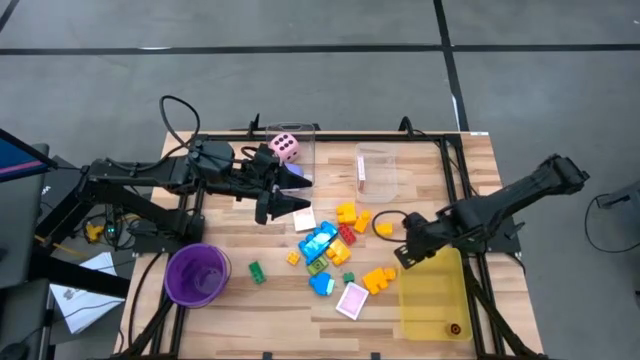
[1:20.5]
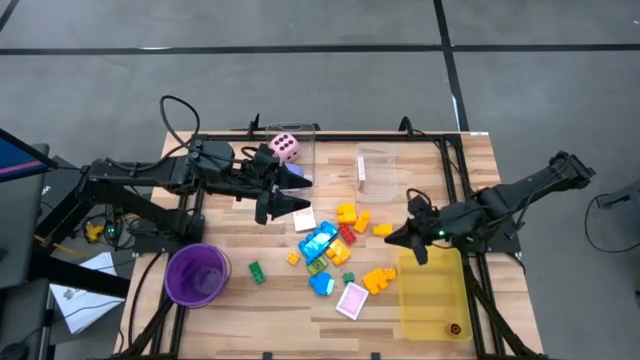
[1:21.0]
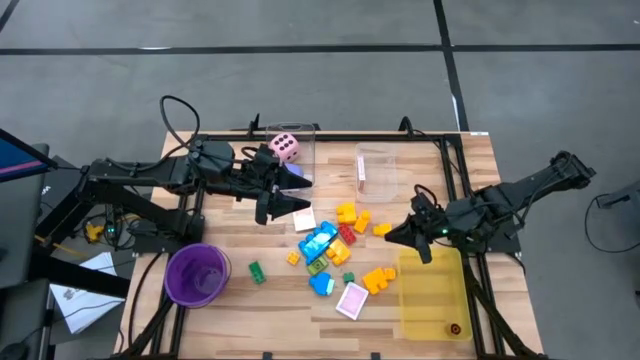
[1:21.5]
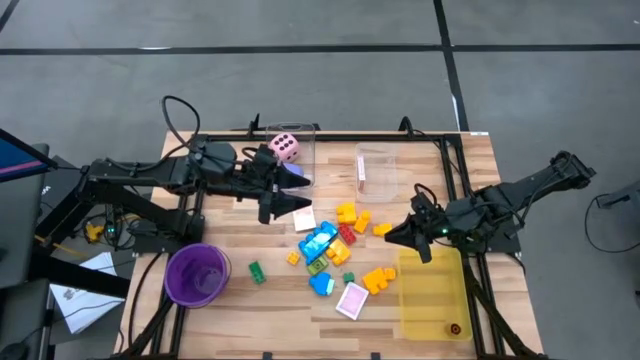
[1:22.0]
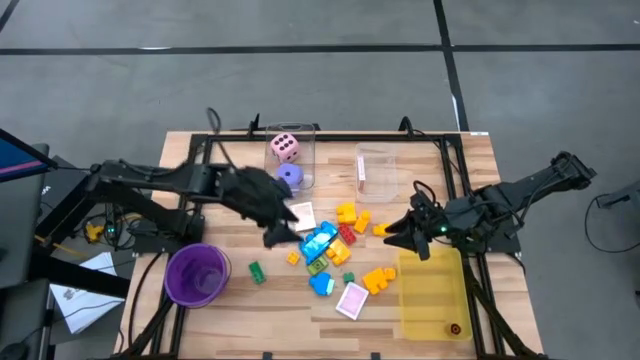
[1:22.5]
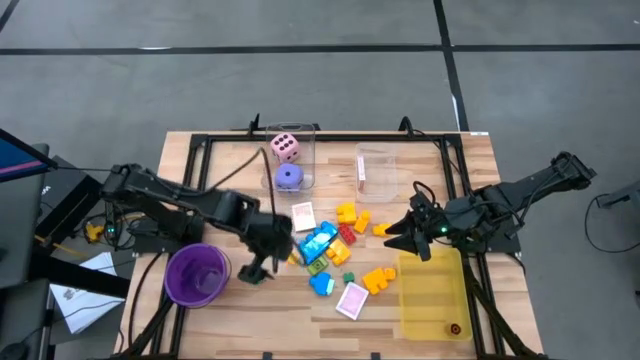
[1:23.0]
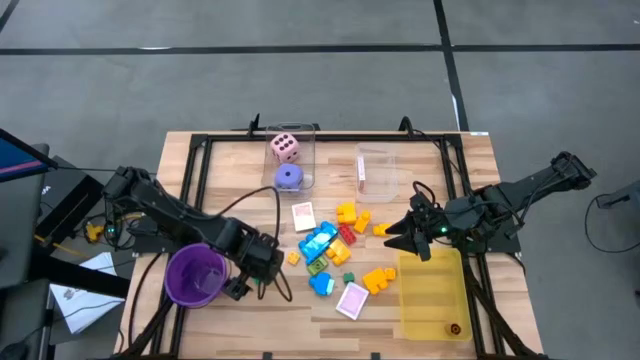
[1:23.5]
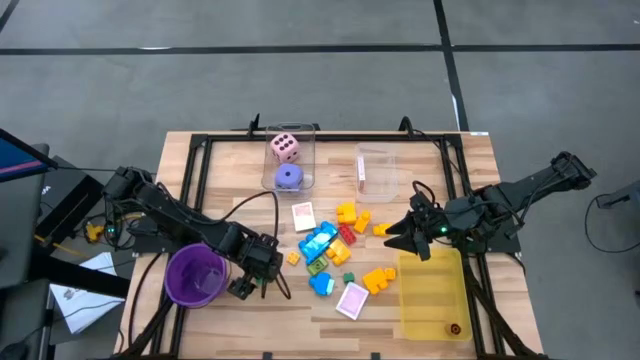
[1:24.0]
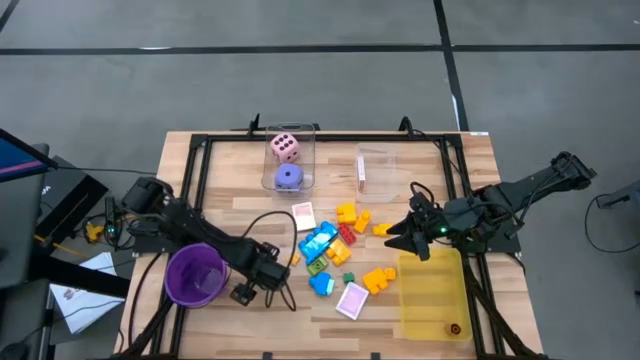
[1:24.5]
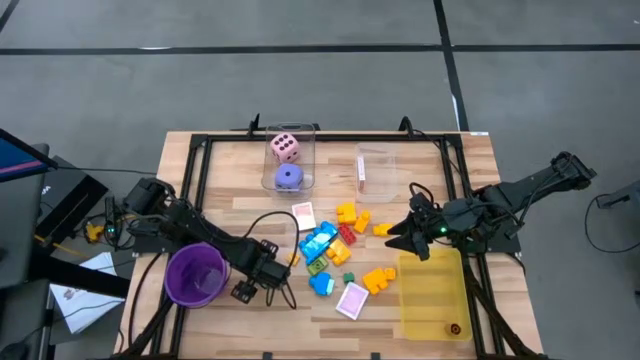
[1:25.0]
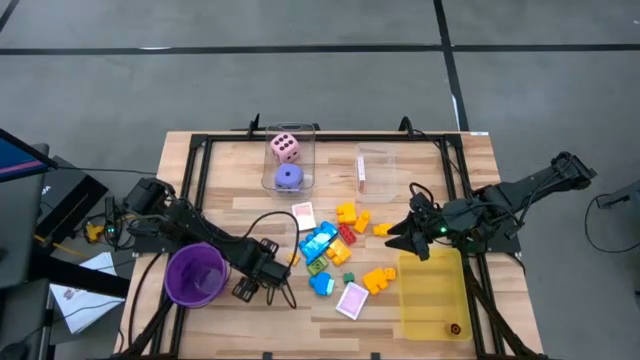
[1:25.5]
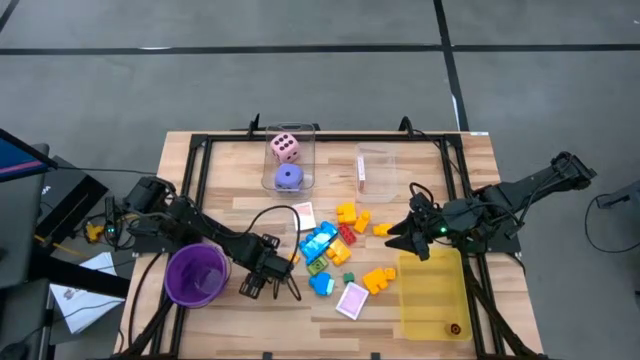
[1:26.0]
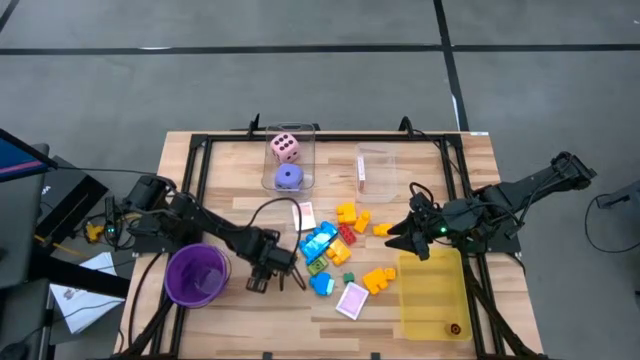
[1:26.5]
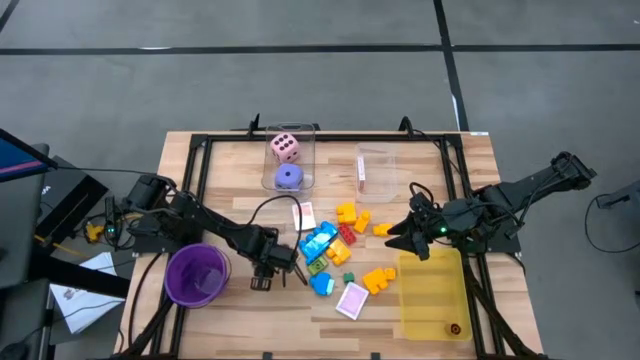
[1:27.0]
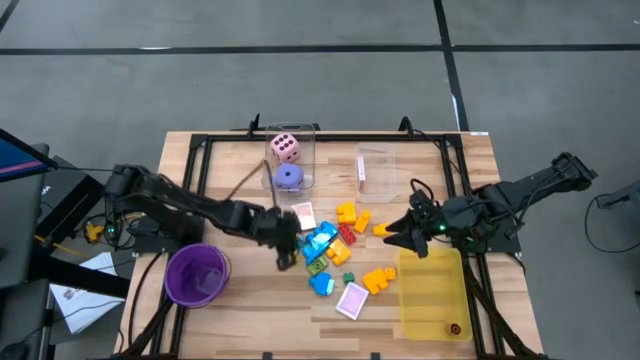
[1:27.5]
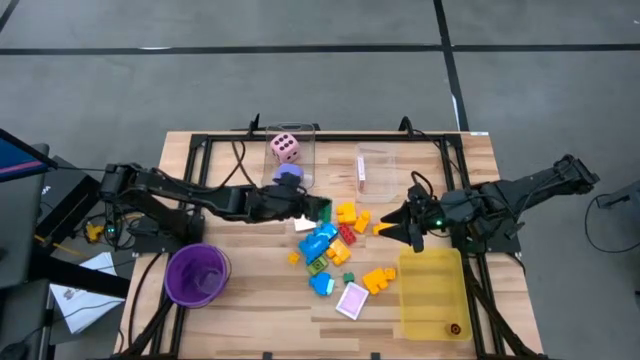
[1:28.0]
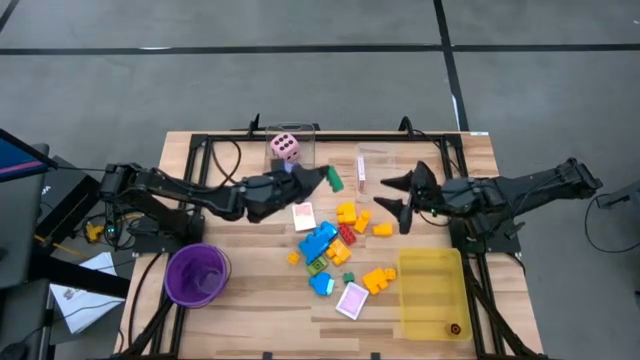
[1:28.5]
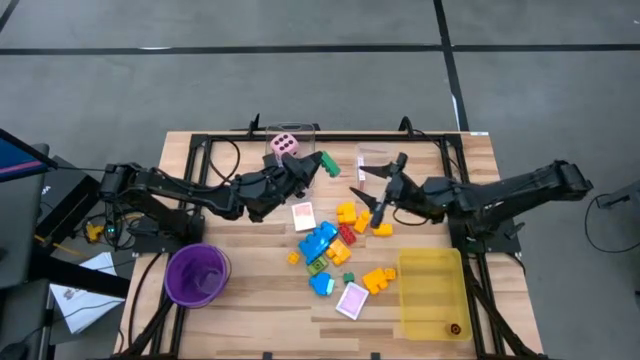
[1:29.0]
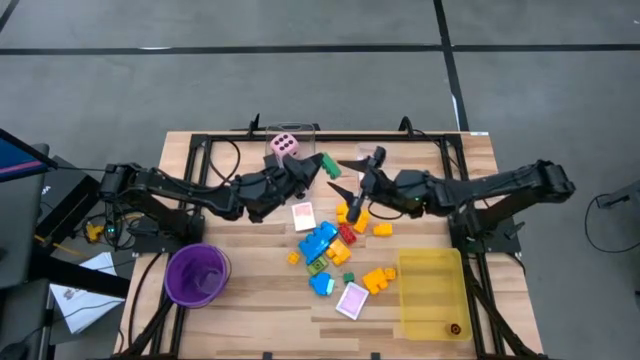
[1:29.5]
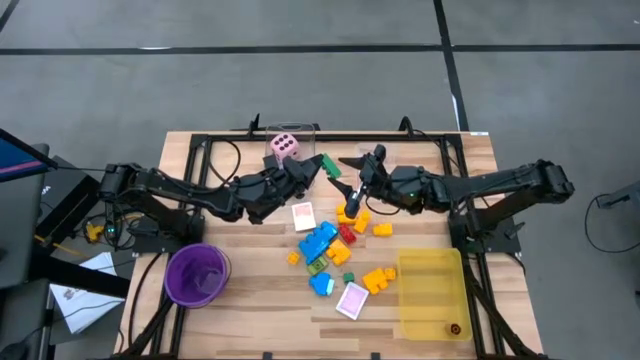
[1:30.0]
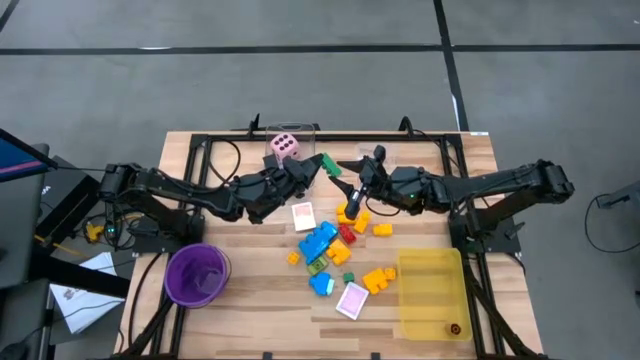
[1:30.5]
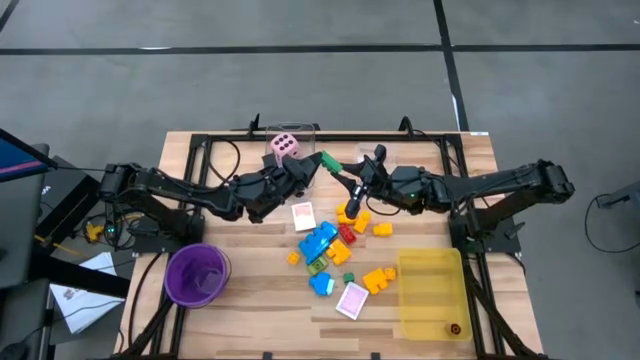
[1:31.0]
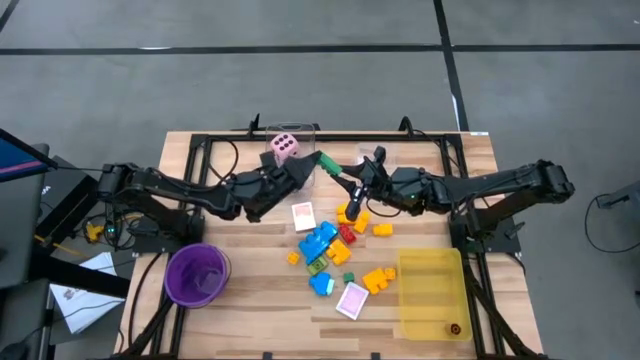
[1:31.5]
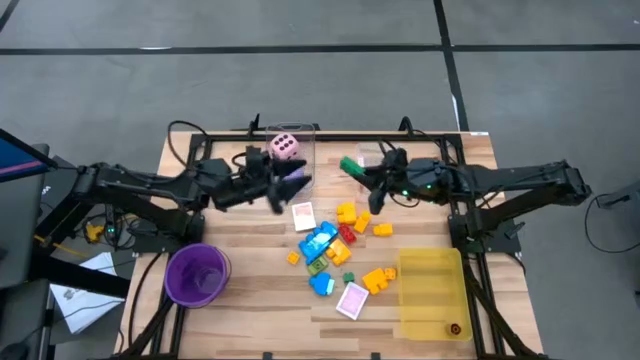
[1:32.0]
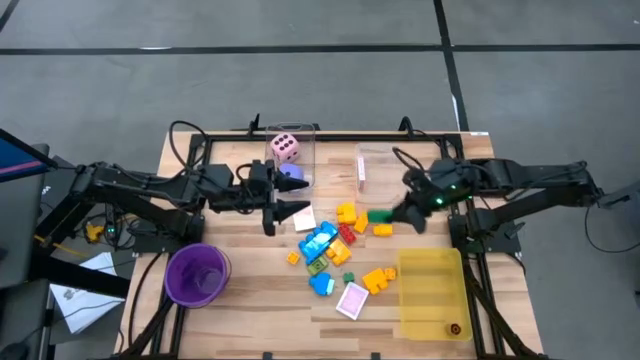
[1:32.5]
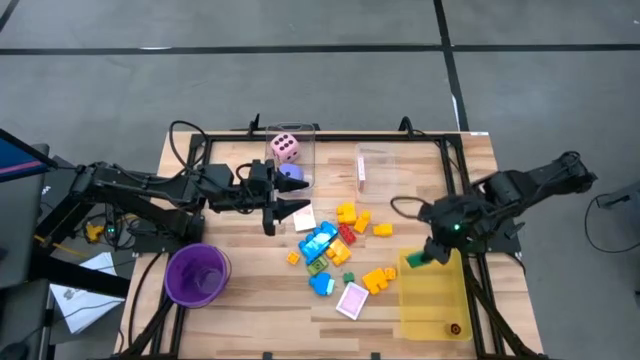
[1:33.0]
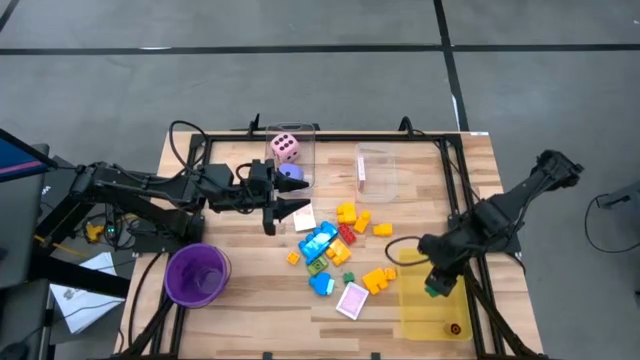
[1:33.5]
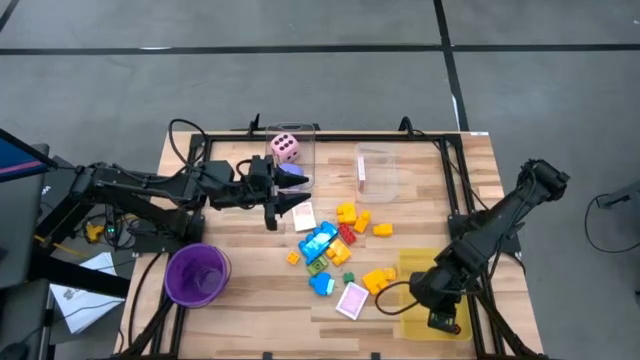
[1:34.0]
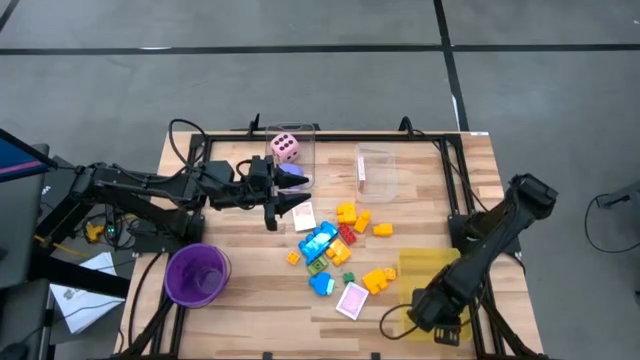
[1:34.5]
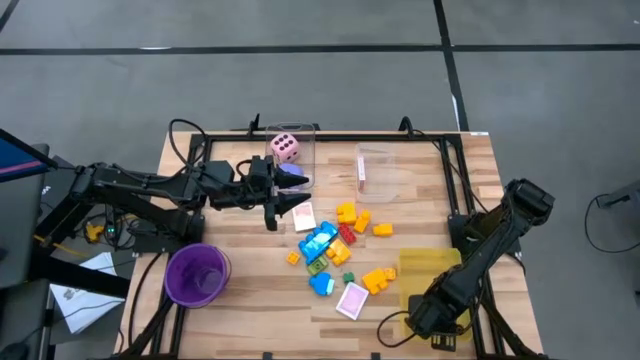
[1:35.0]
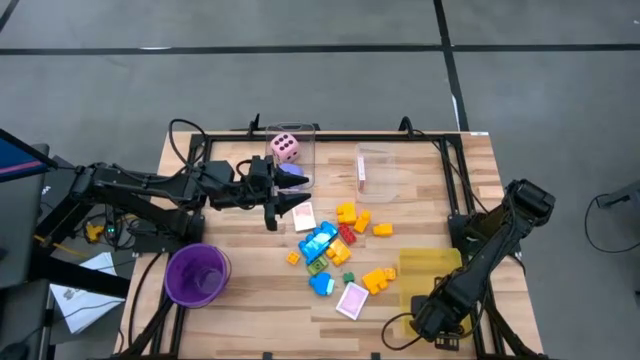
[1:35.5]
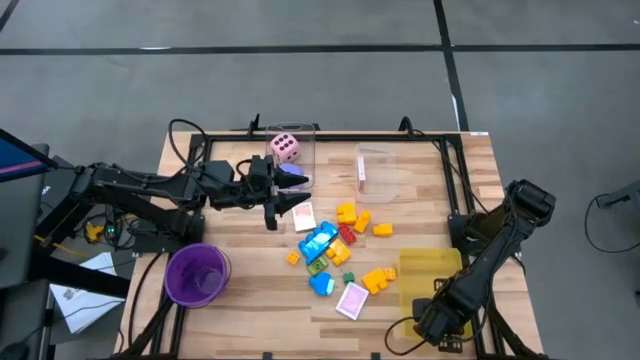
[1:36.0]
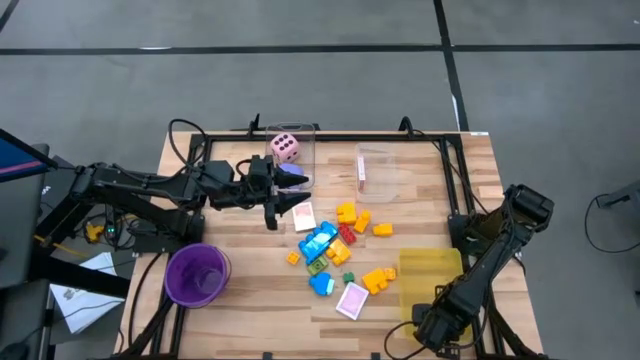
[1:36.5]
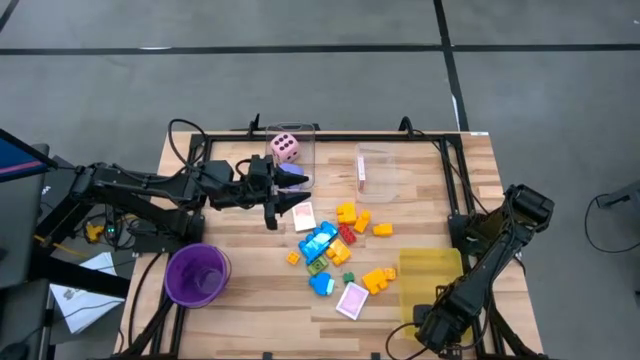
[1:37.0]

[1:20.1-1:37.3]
Task: Pick & Place Toys
Put the left green game piece into the bin

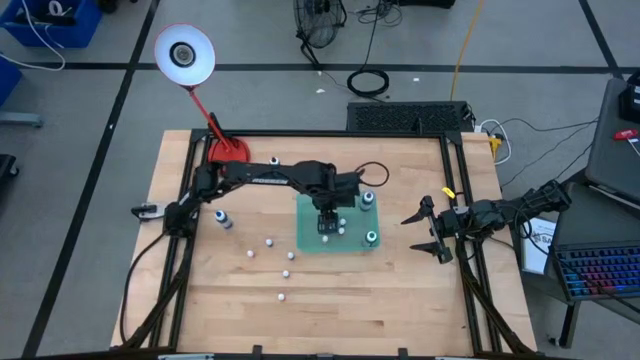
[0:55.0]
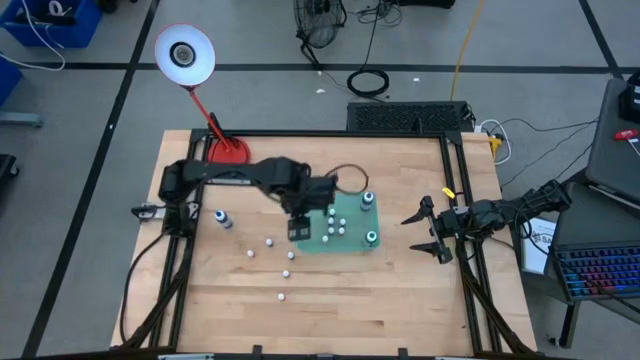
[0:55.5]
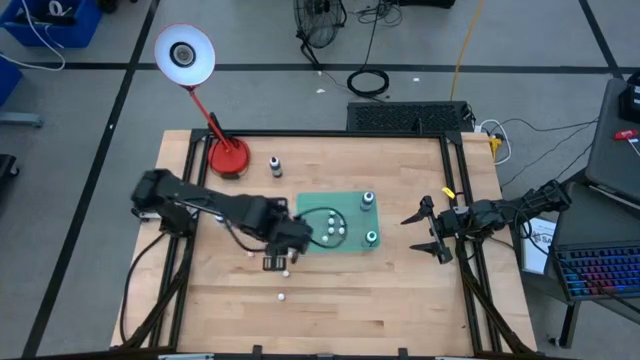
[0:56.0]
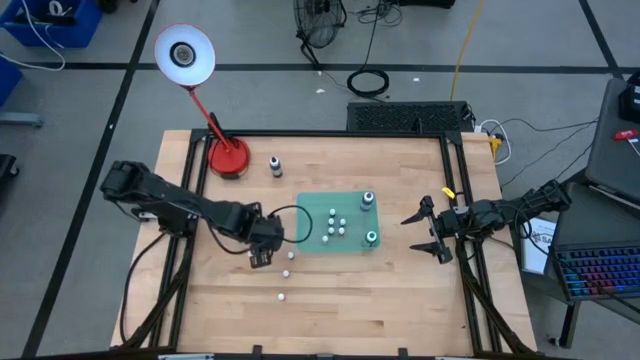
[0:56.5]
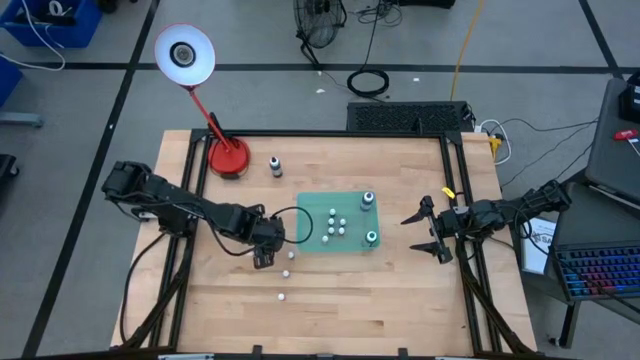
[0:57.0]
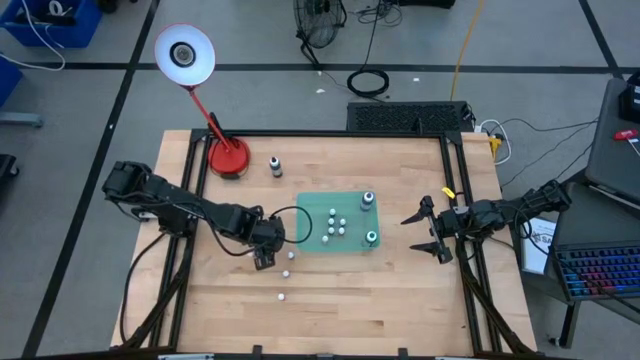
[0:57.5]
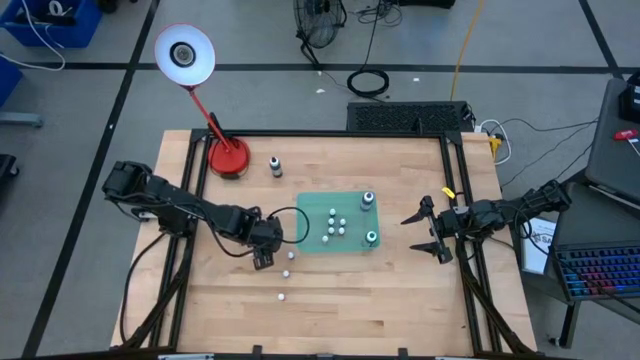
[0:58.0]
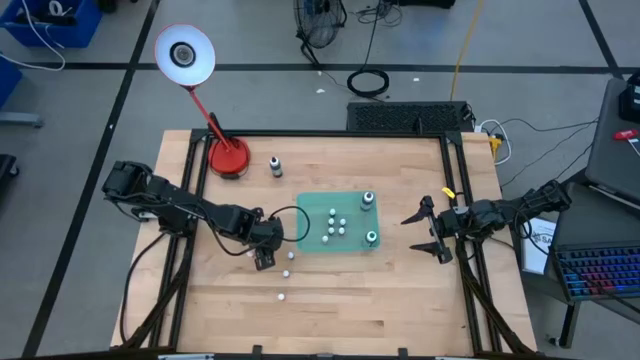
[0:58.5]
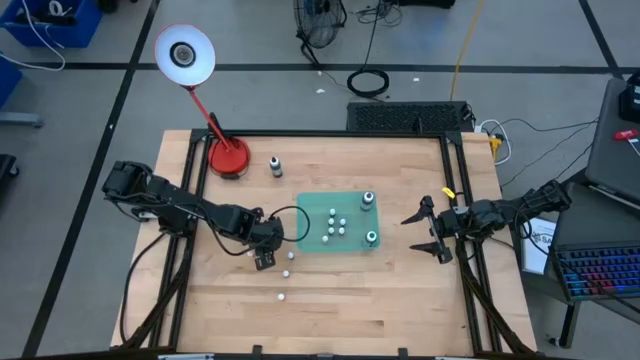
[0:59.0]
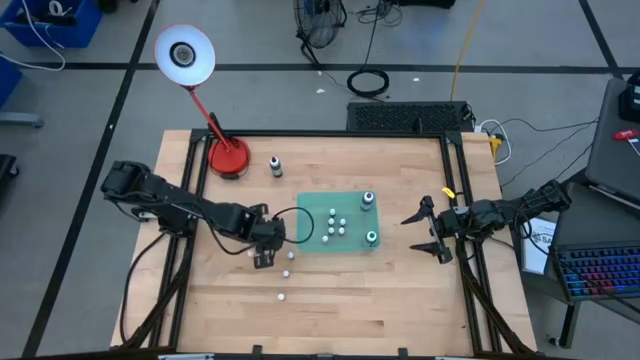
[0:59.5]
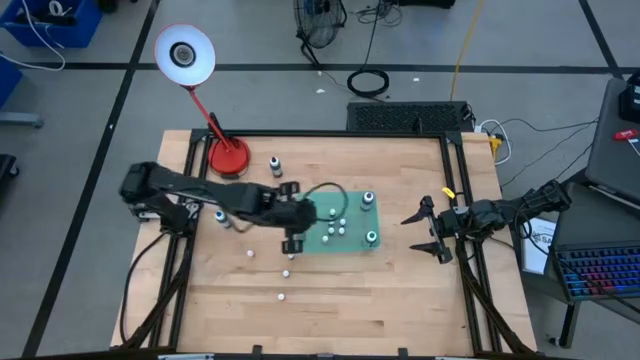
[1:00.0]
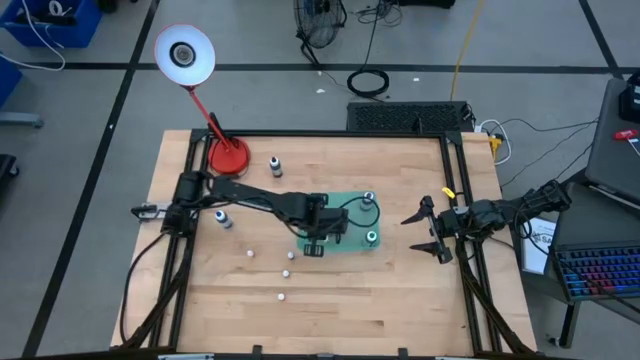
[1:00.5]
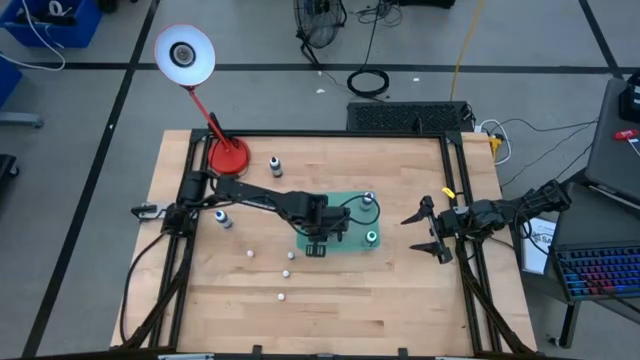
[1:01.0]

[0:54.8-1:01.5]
Task: Pick & Place food coloring
Put the small dark blue food coloring bottle into the blue bin
